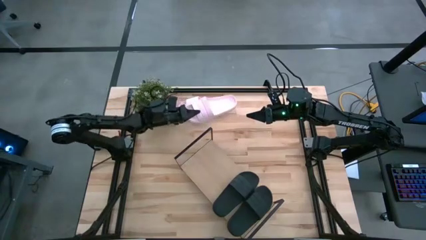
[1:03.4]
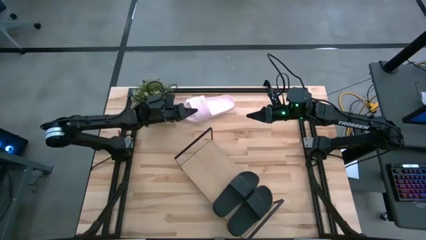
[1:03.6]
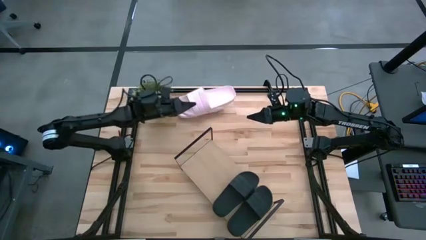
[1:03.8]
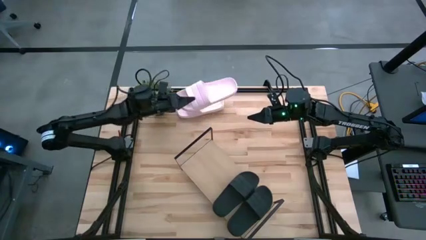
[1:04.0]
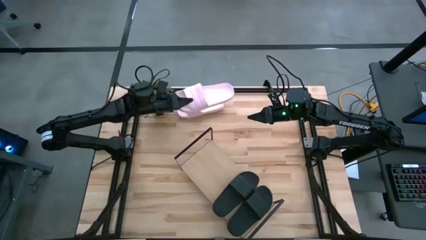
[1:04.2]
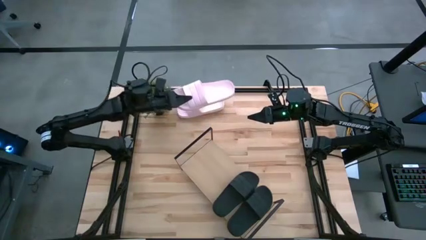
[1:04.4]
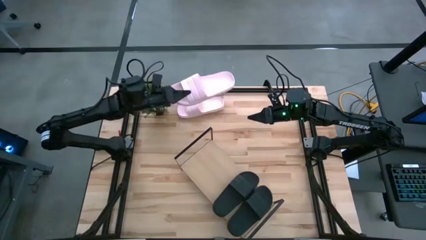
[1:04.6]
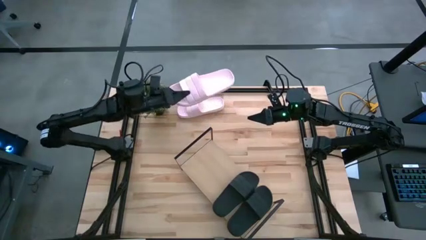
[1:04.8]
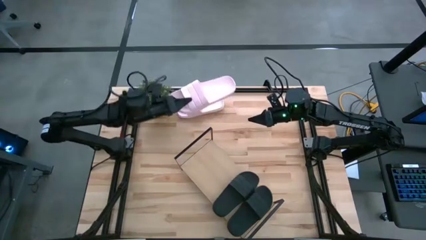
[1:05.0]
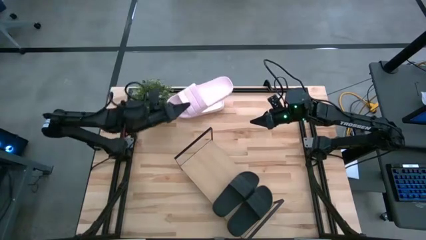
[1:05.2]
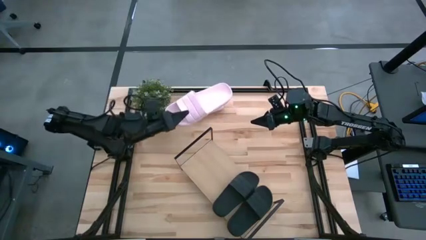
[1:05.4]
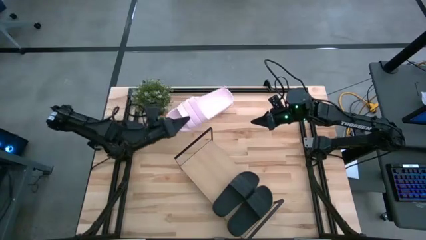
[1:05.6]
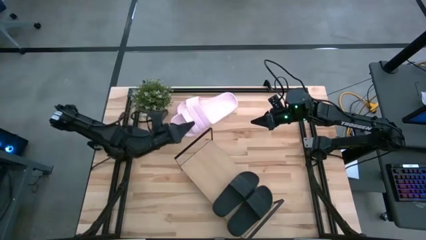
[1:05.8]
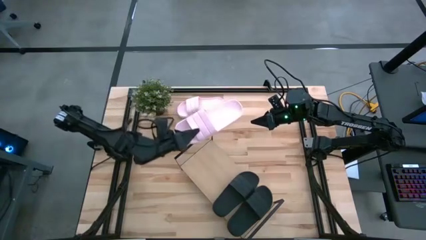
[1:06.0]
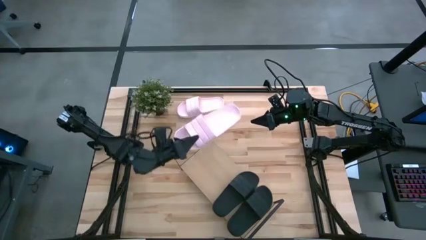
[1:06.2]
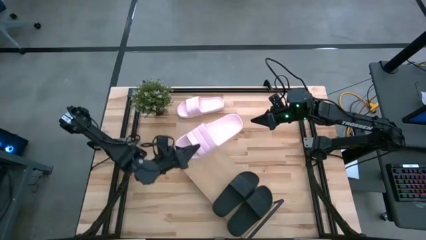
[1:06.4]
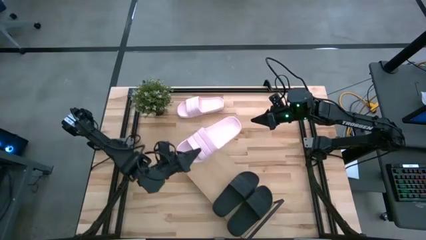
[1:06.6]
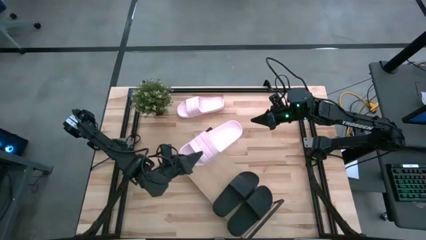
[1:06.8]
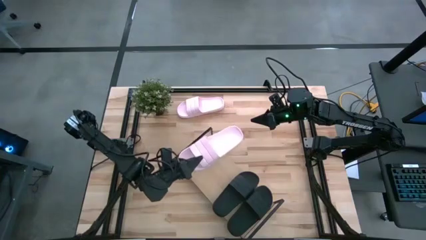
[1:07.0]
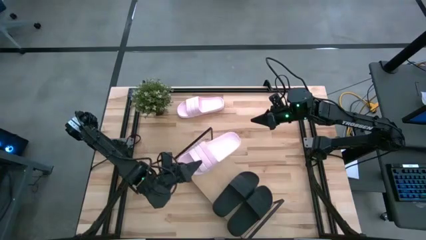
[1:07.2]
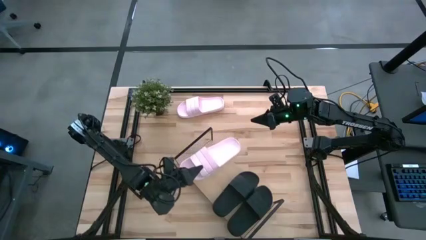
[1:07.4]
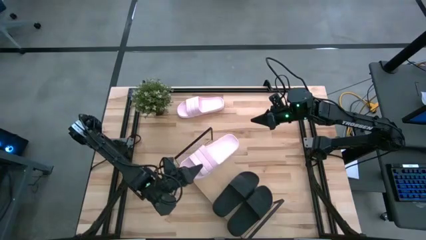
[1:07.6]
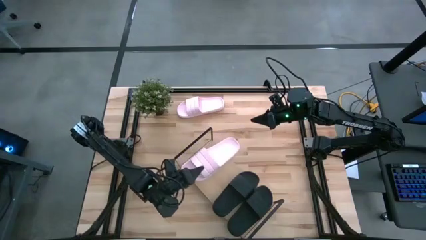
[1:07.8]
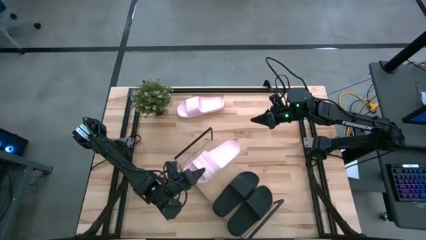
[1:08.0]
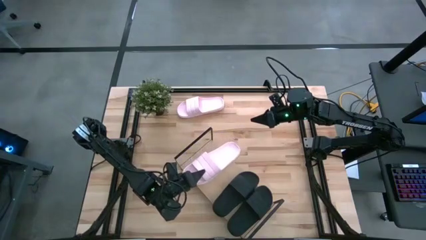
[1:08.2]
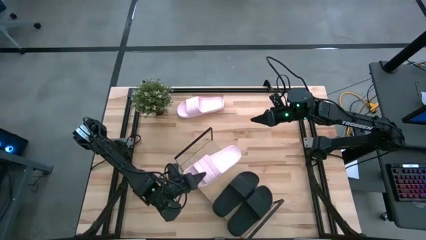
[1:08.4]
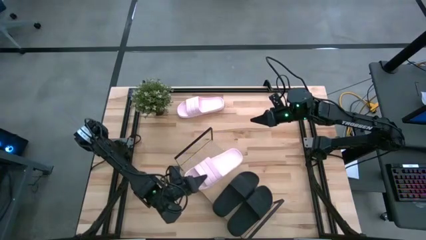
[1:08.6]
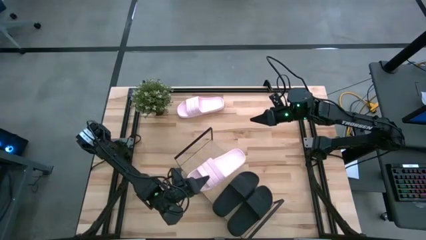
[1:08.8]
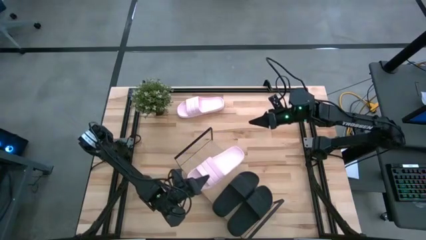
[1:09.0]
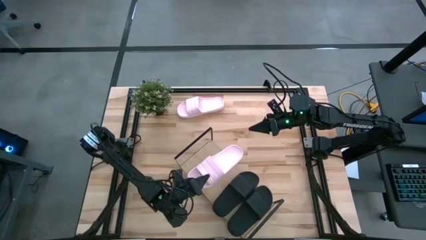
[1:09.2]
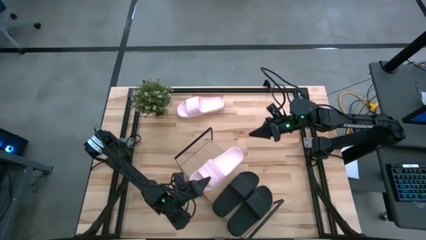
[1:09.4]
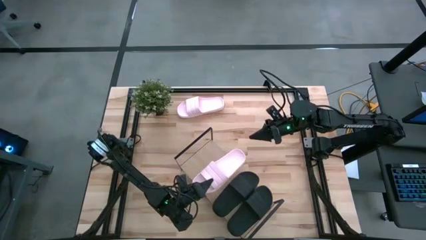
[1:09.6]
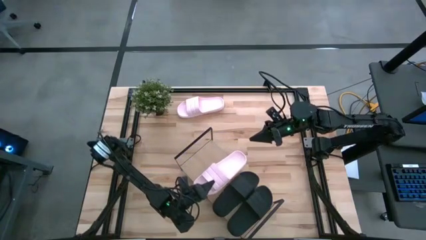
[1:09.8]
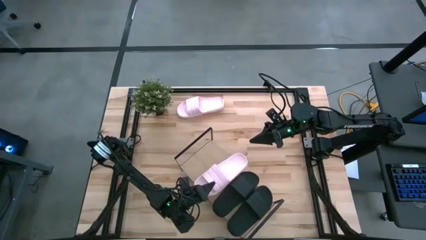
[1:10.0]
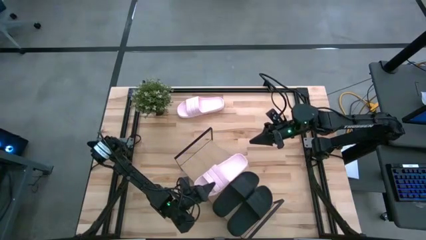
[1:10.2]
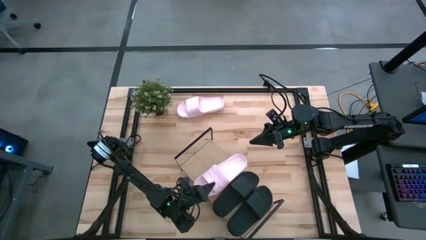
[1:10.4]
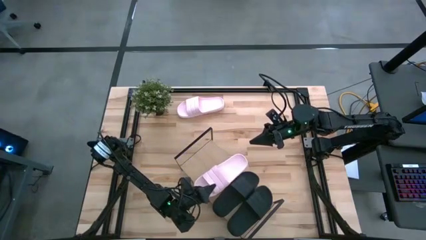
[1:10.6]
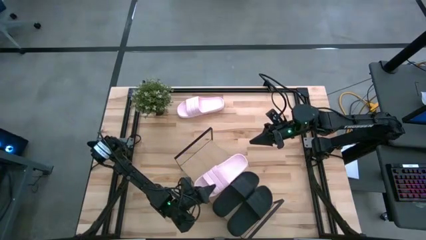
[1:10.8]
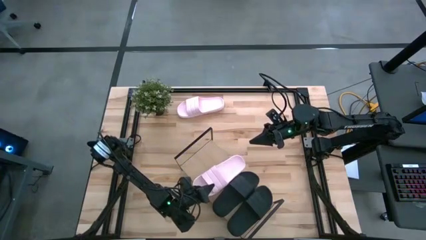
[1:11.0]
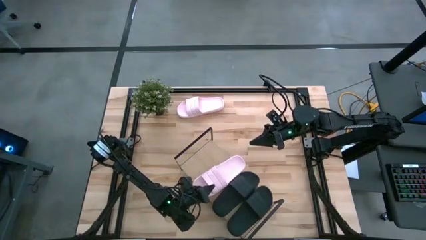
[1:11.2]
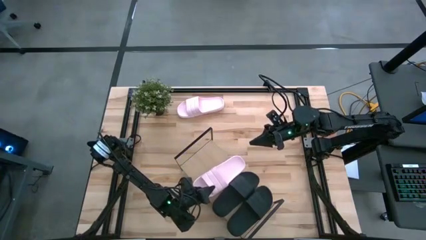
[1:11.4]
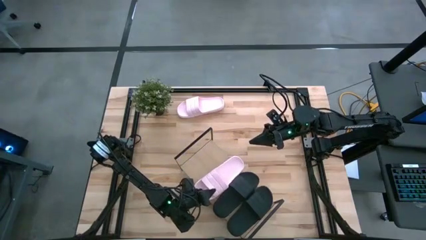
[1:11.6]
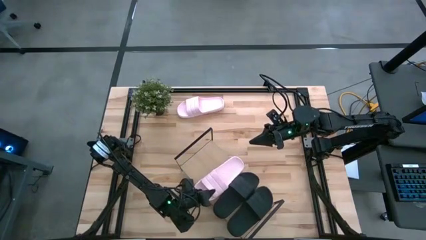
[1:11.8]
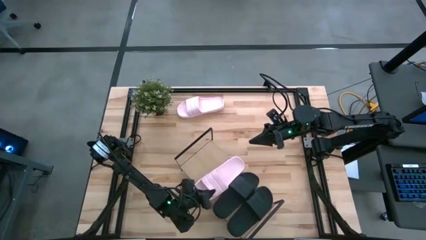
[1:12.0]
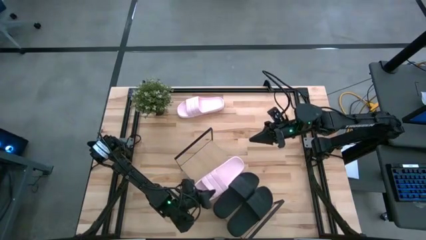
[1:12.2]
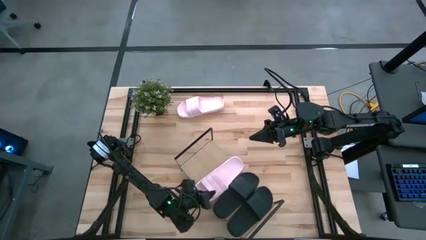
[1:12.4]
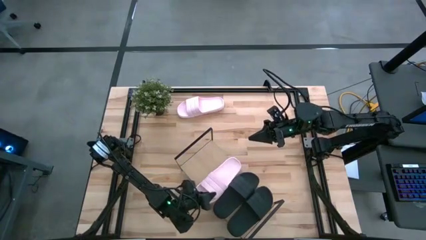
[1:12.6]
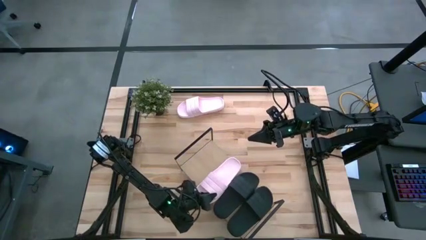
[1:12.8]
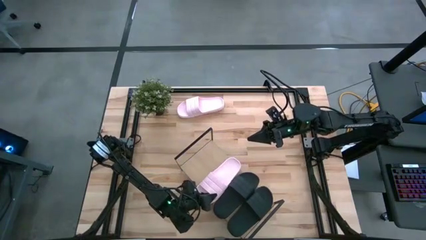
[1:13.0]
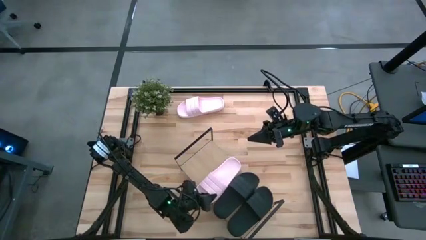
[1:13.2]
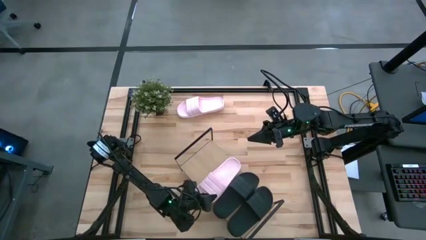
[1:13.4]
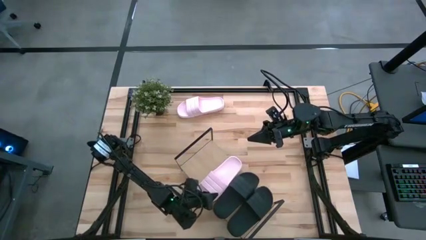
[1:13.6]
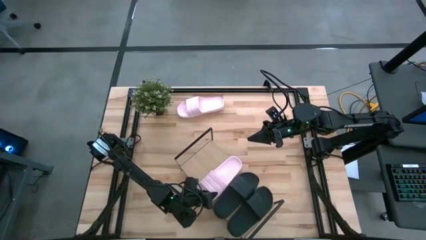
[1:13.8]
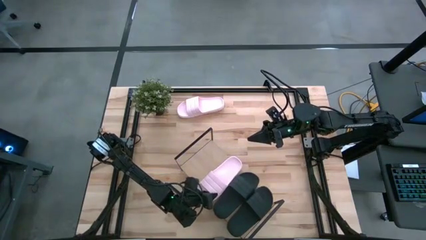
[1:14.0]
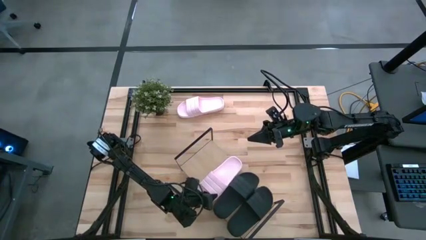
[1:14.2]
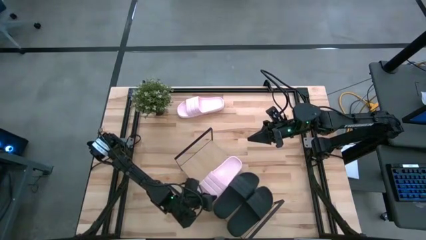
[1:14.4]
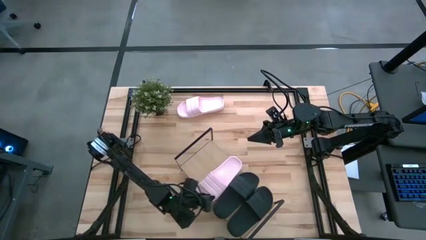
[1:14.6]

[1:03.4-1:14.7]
Task: Pick and place slides into the shelf
Put the bottom pink slipper on the shelf beside the black slipper

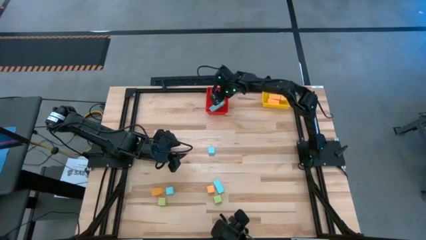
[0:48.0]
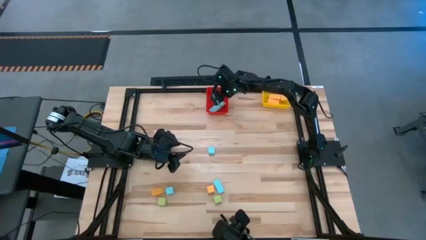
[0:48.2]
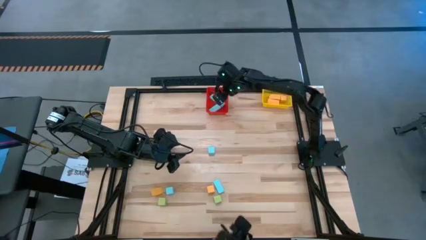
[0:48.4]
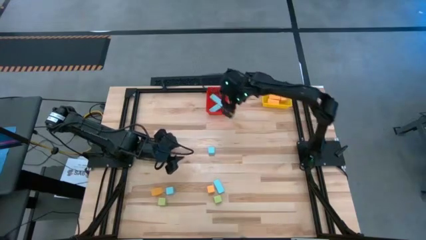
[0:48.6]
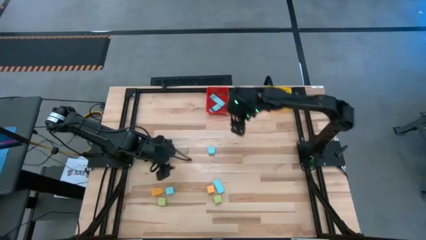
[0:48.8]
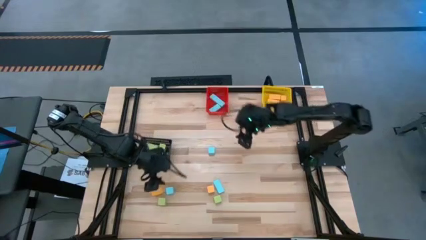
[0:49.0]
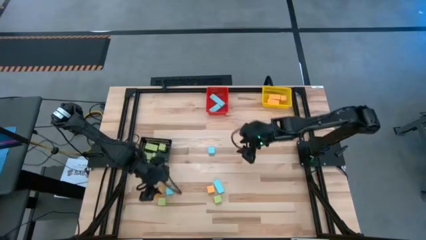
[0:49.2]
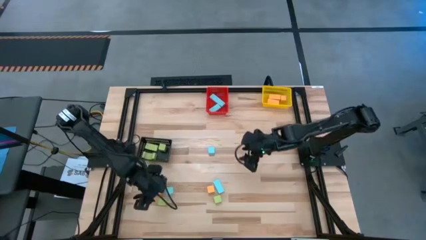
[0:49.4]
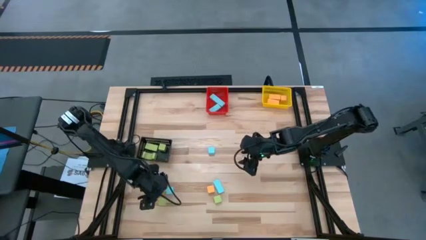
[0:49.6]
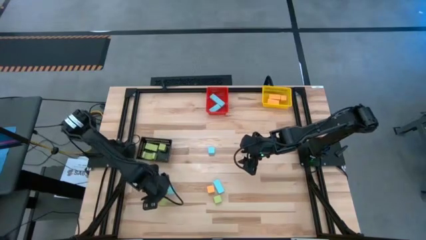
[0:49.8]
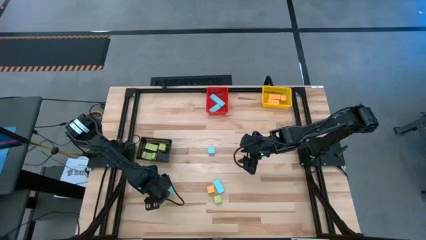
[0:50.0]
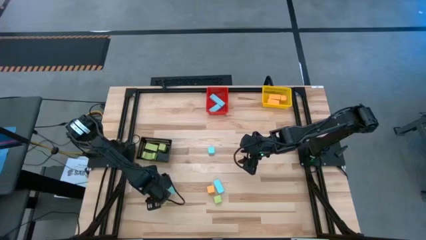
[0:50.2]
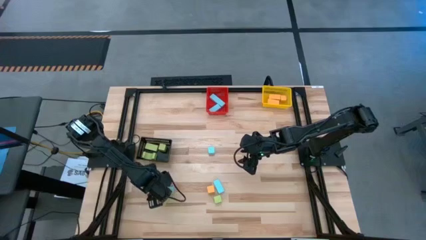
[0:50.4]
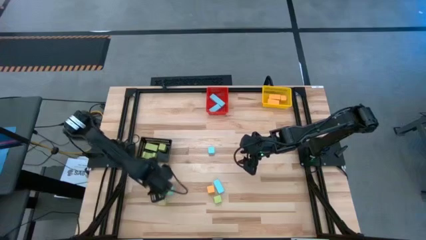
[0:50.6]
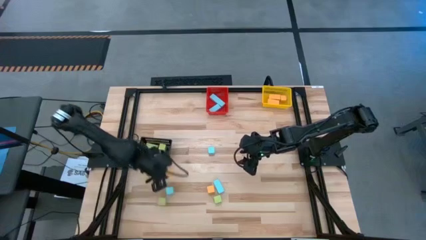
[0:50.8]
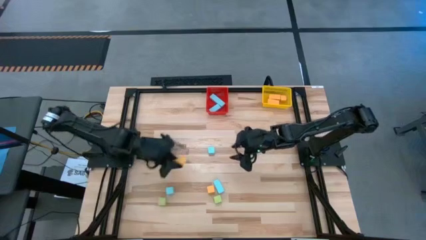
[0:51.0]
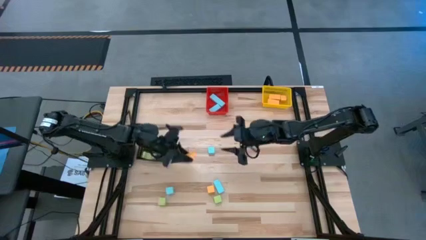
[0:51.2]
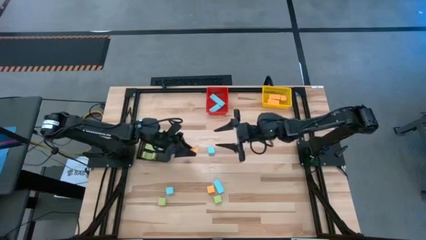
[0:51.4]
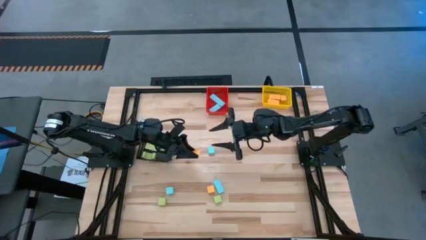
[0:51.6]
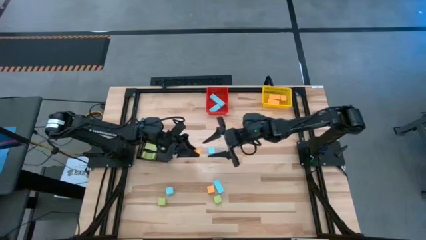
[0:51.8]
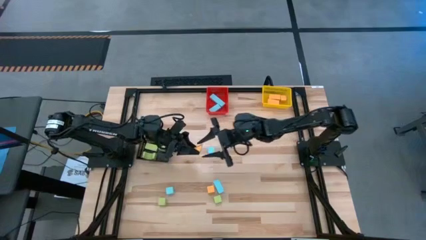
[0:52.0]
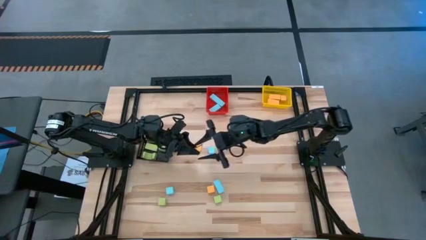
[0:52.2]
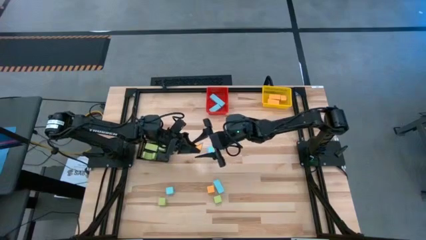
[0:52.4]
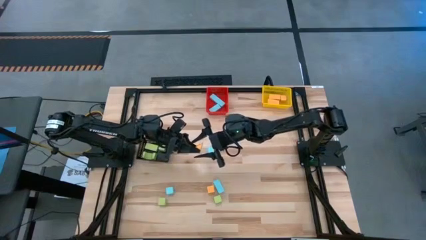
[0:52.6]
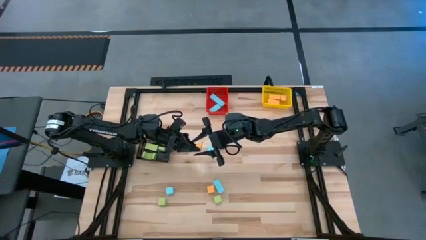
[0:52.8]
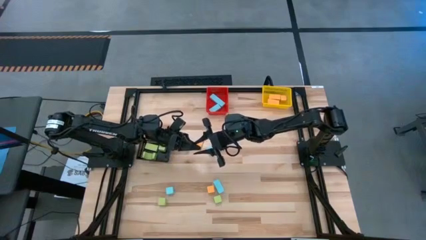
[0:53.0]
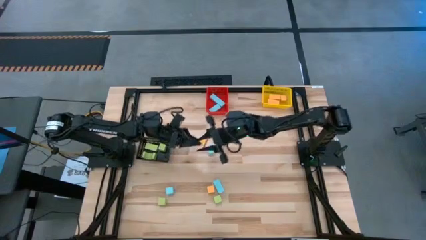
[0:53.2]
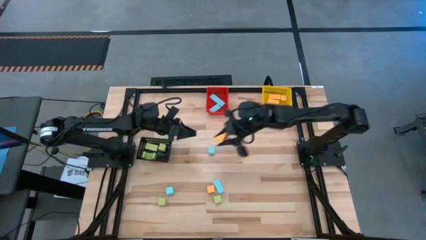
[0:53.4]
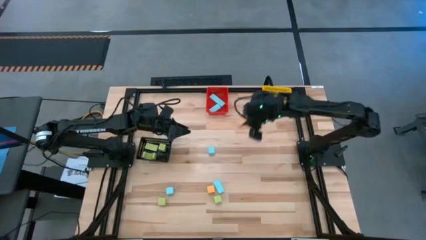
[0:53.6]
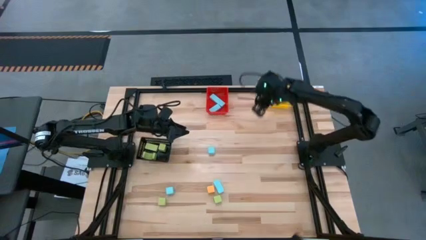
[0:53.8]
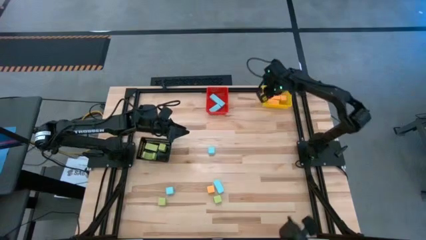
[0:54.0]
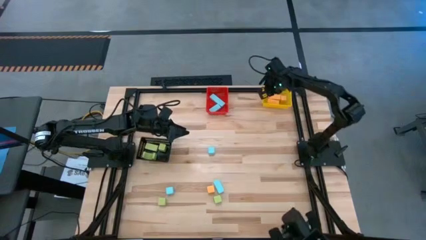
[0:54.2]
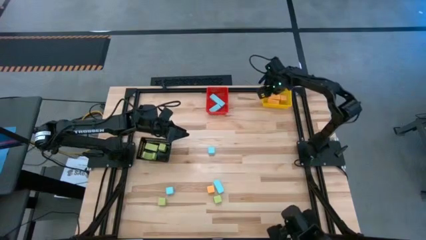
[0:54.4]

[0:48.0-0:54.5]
Task: Sort & place blocks by color
Put the yellow block into the yellow bin
